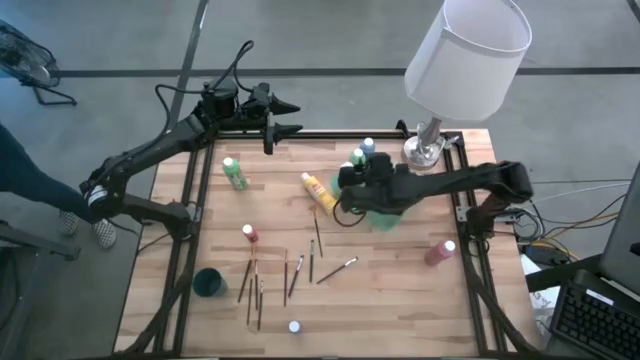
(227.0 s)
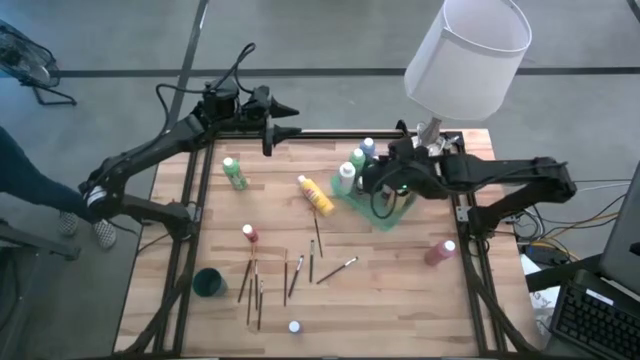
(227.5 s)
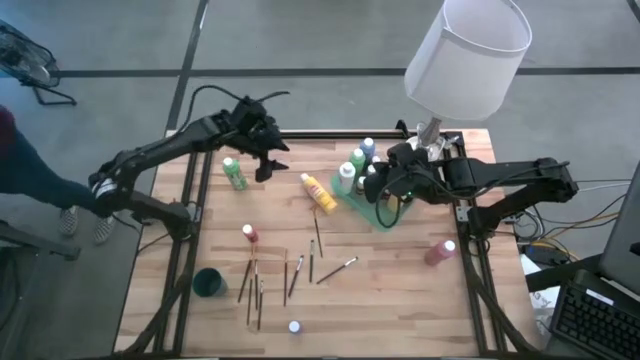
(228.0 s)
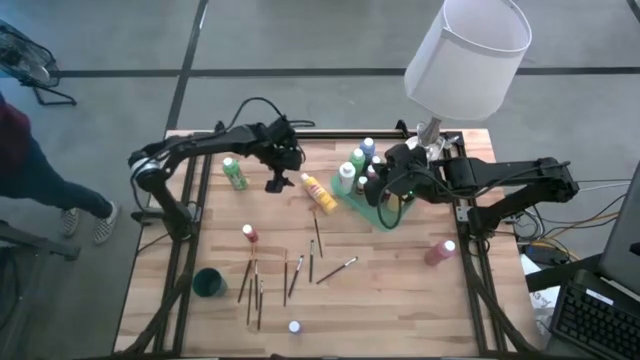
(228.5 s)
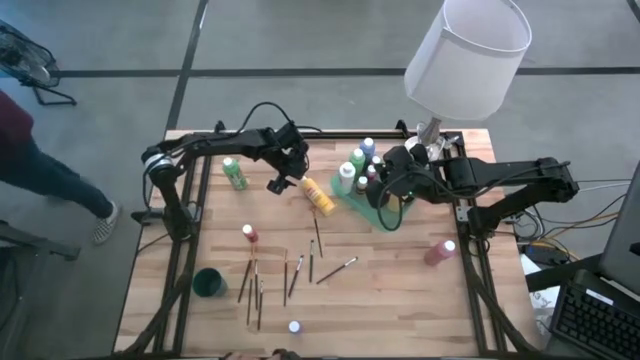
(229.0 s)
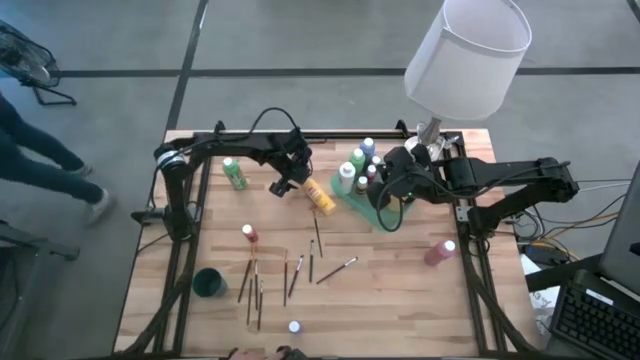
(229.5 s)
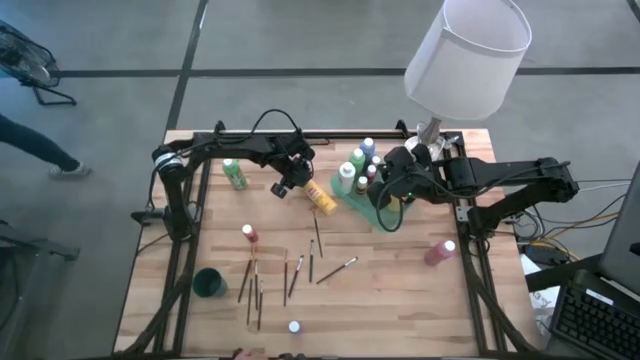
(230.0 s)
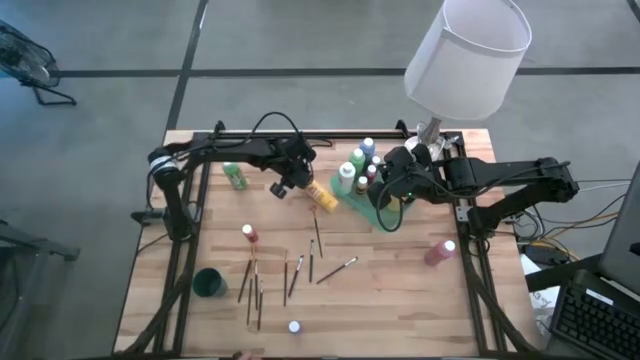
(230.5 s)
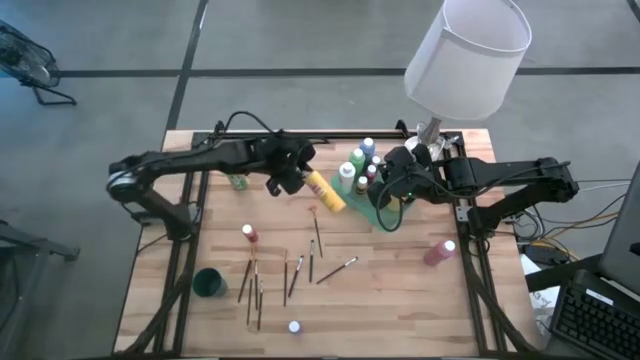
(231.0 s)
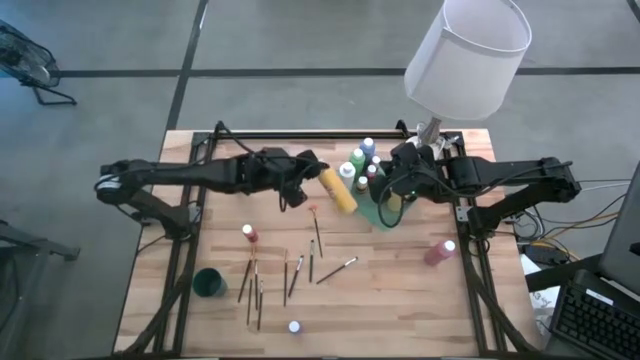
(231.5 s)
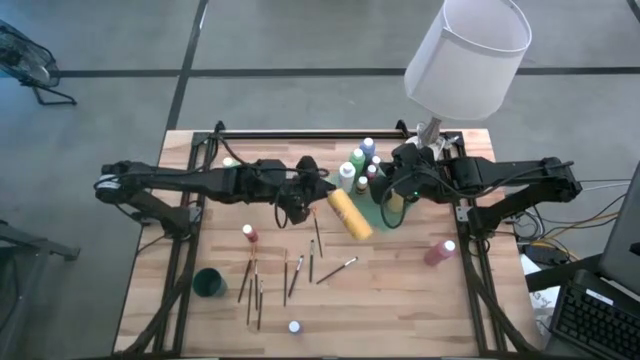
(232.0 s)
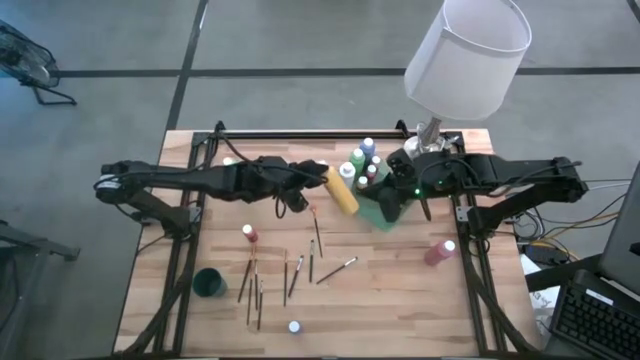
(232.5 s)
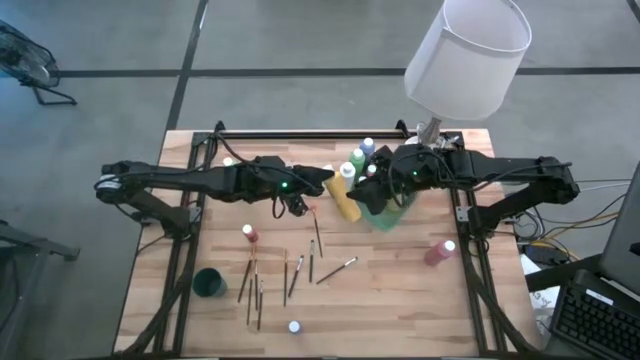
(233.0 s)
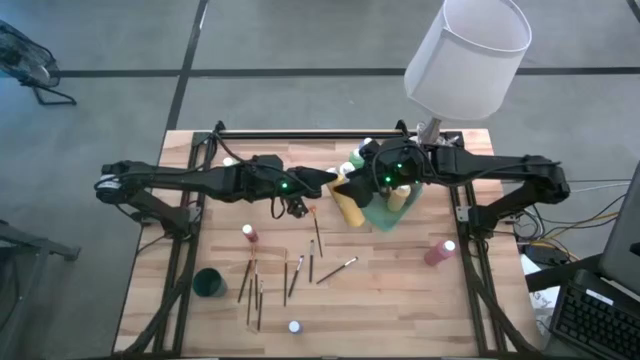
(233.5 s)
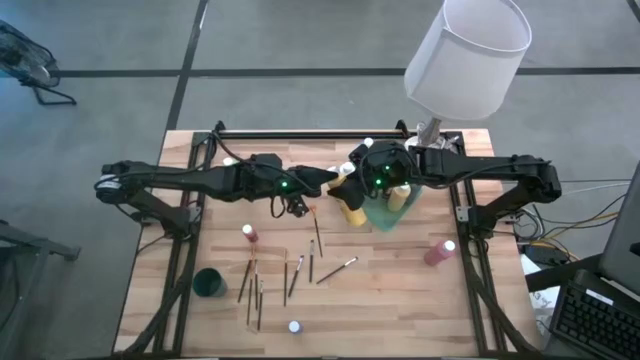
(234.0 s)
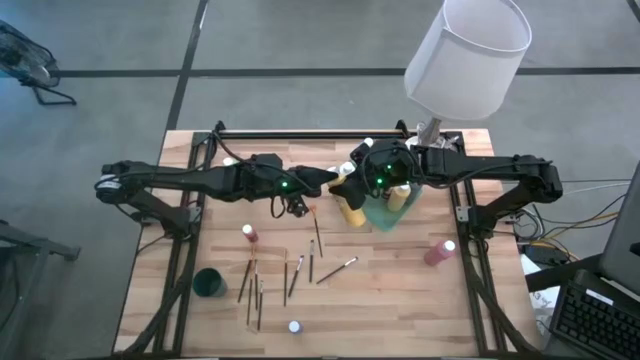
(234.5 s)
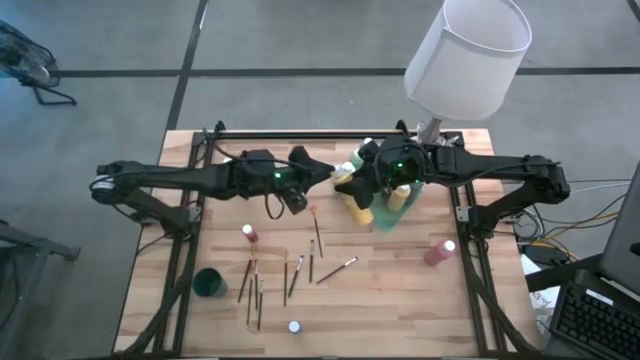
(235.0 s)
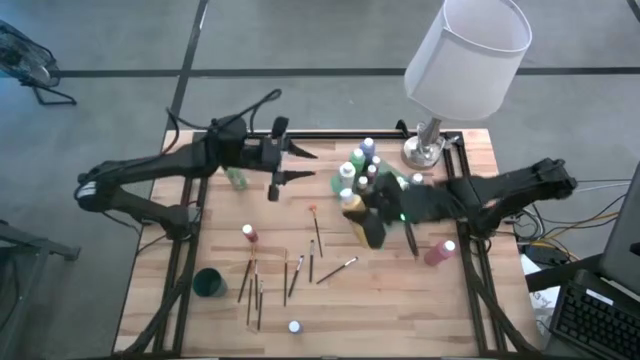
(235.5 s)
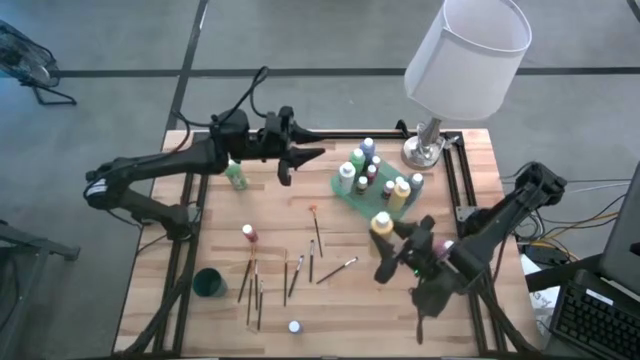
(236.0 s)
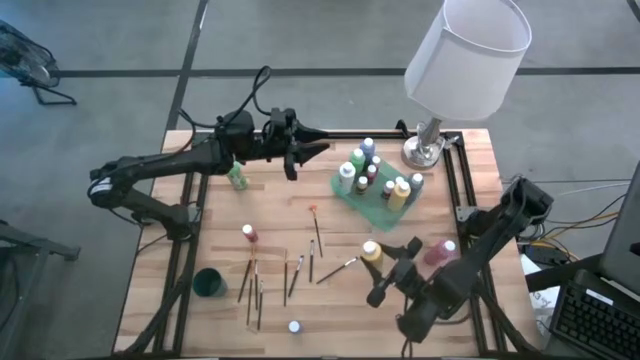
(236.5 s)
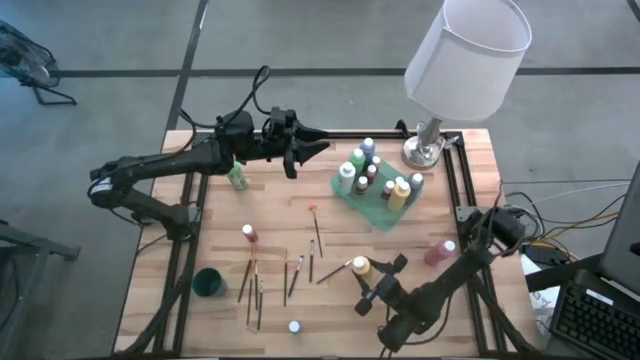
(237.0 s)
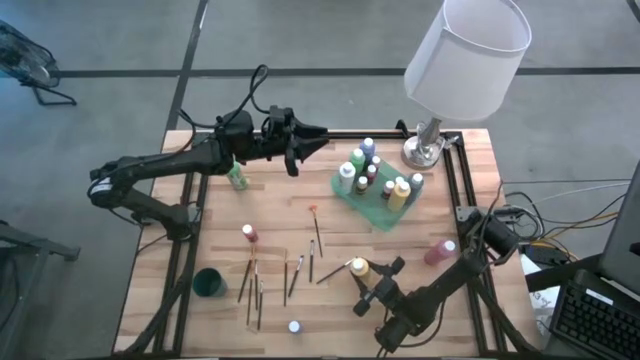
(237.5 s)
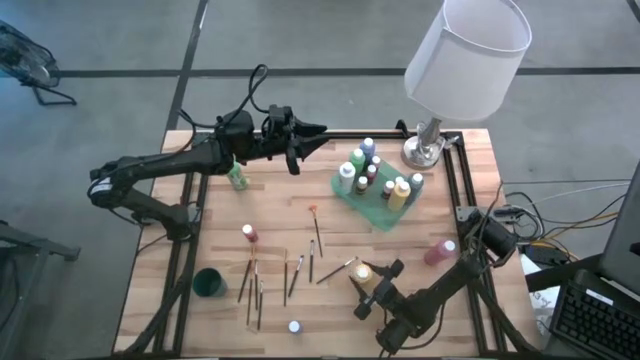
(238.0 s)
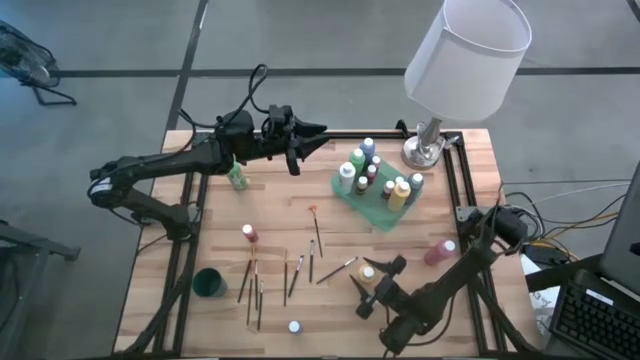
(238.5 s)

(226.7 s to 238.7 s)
Task: Pick & Place Paint Supplies
Move the big yellow paint bottle to the bottom right of the table

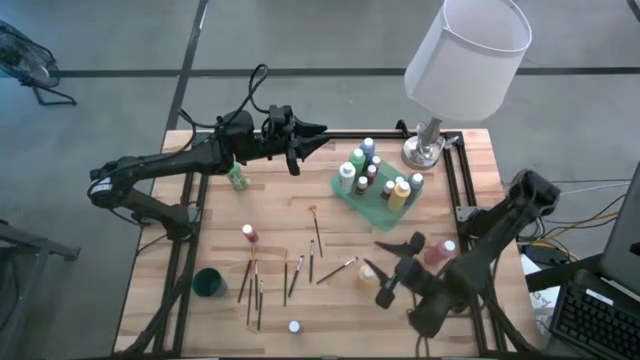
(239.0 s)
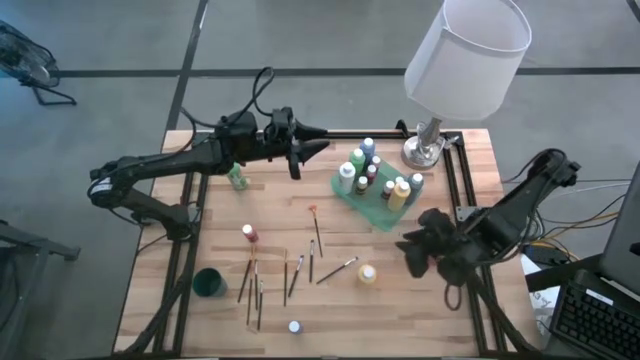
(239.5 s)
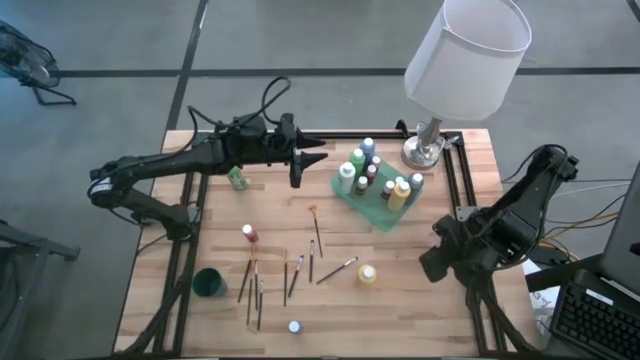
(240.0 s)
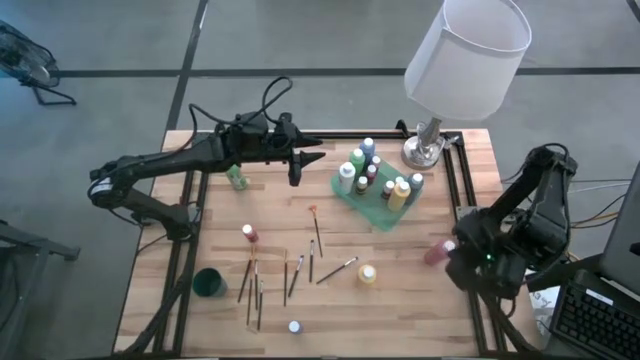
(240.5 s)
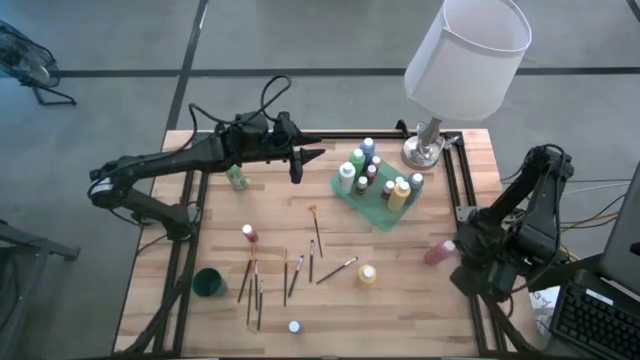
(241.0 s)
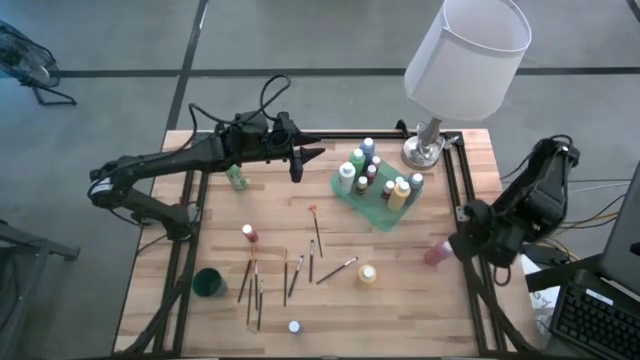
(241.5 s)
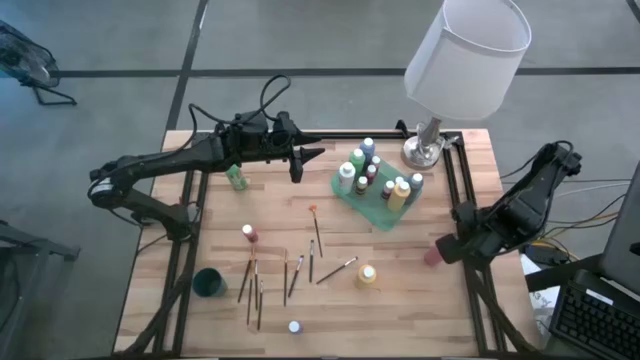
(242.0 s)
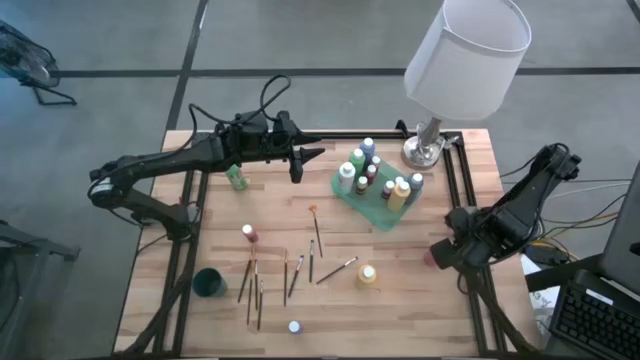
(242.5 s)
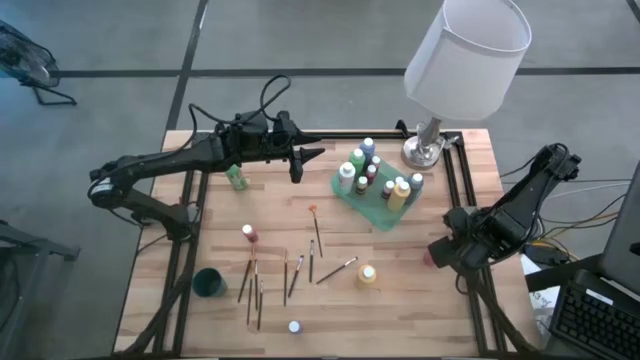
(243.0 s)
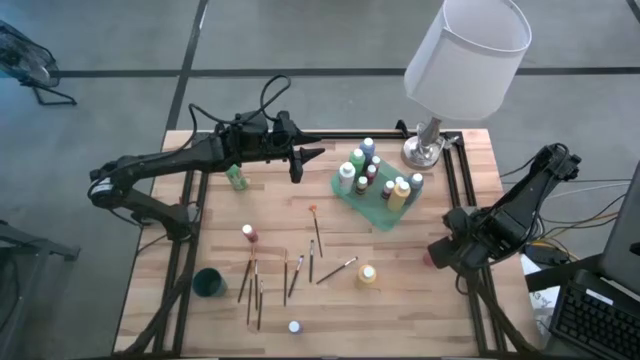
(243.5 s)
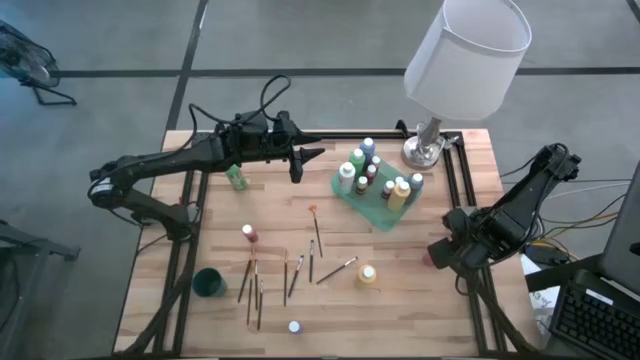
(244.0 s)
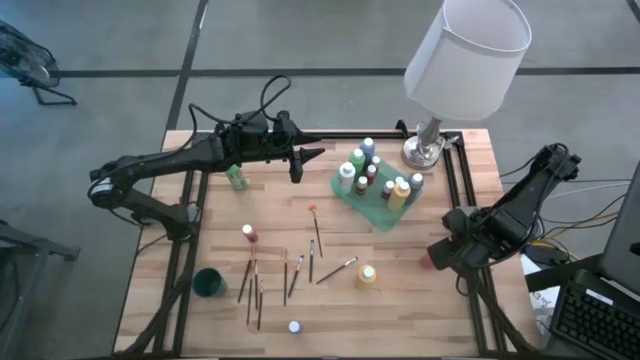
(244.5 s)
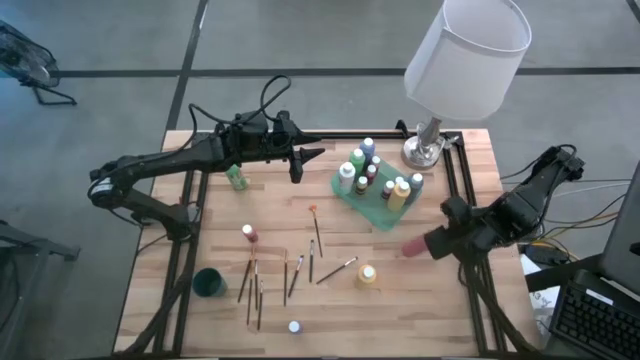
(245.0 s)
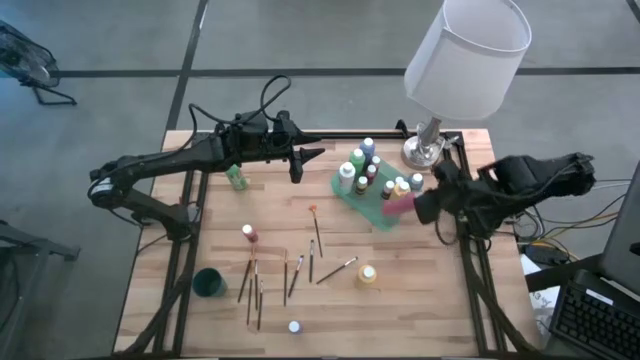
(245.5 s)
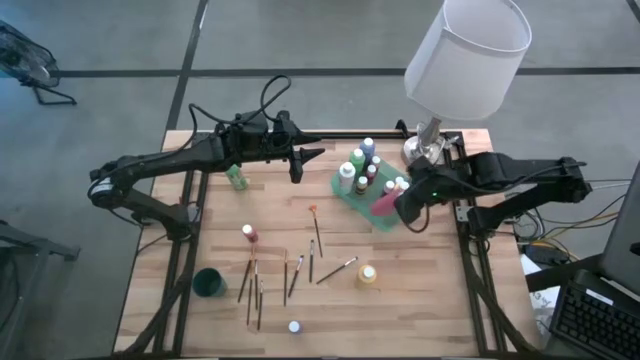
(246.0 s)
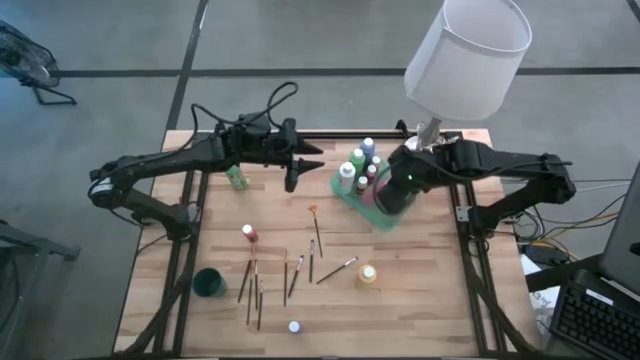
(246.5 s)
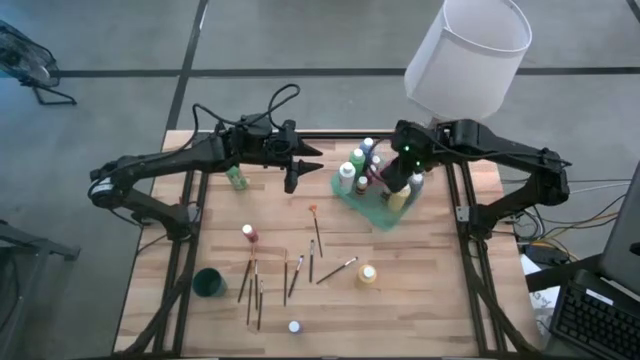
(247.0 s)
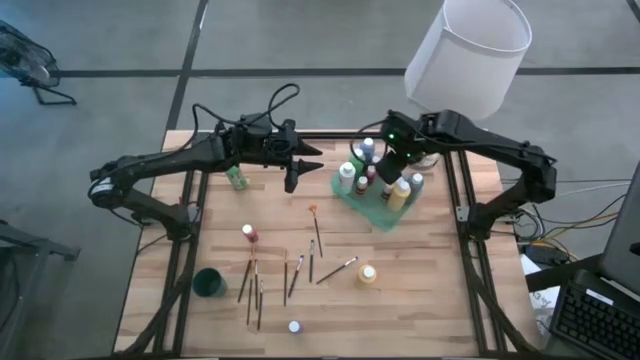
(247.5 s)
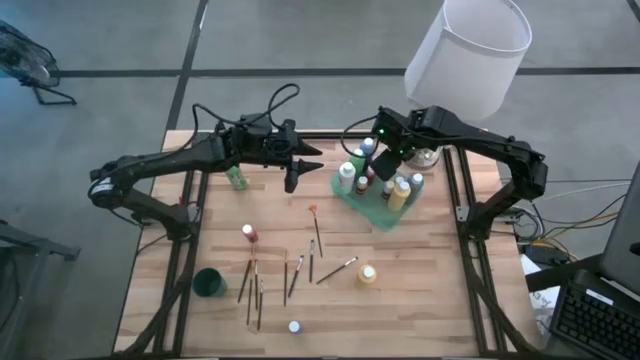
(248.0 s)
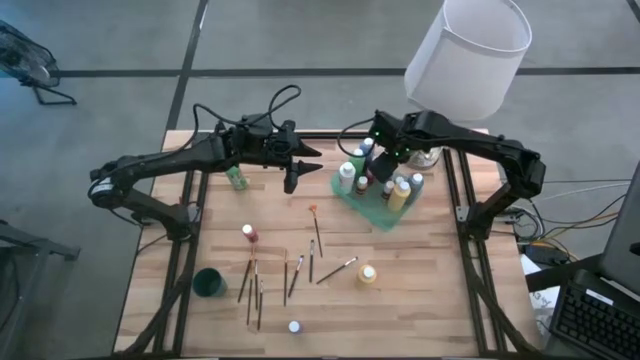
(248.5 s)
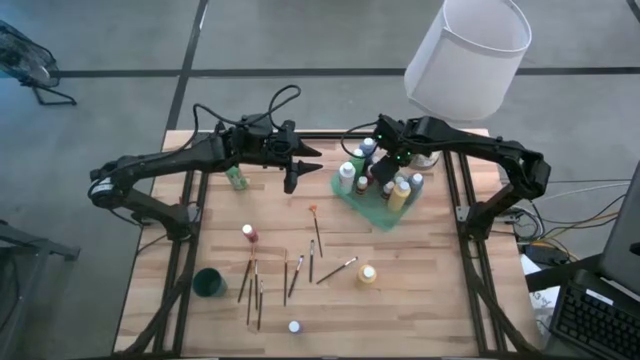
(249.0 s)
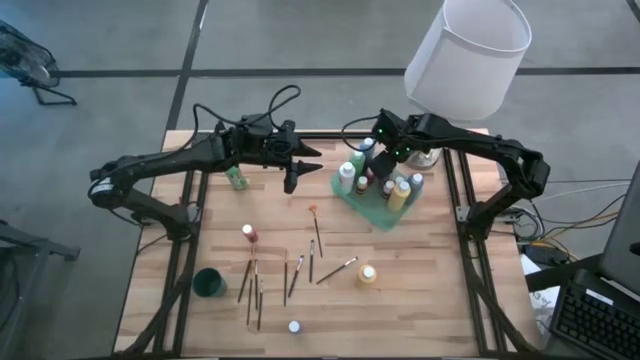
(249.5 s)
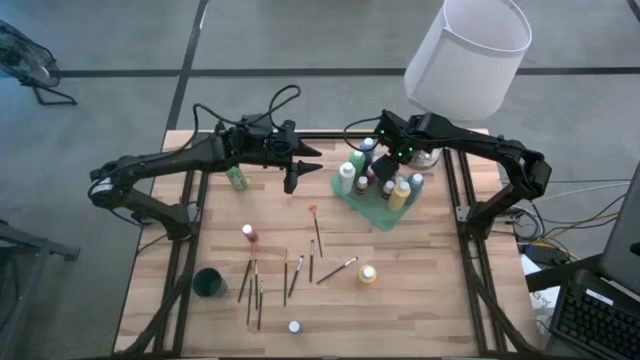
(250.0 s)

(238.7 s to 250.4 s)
Put the big pink paint bottle into the green bin
